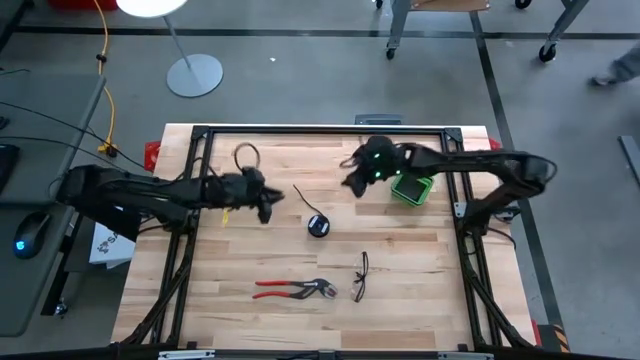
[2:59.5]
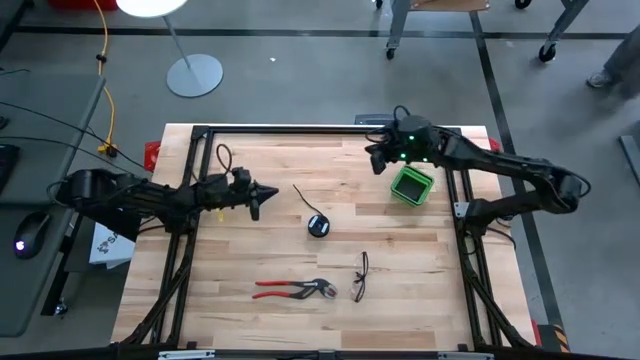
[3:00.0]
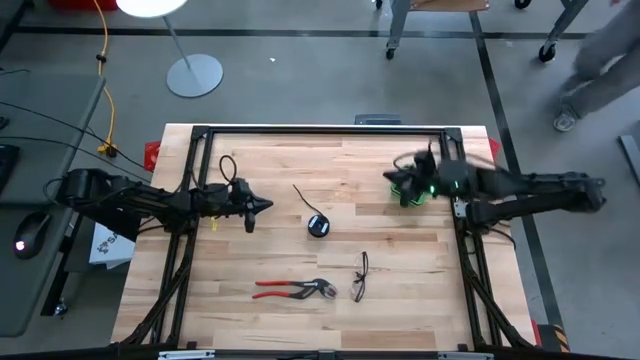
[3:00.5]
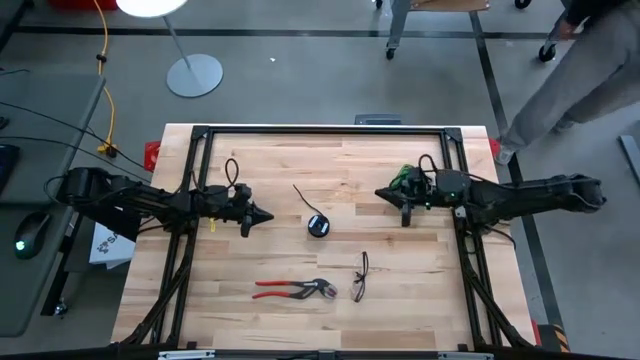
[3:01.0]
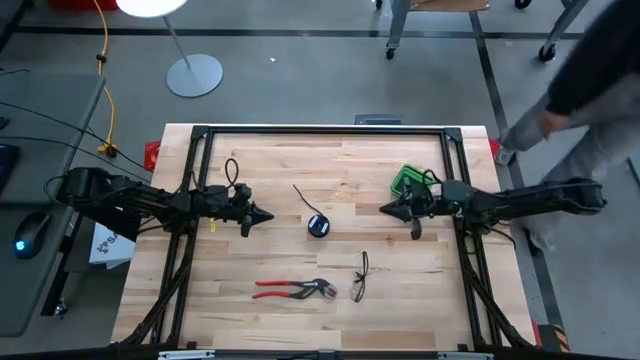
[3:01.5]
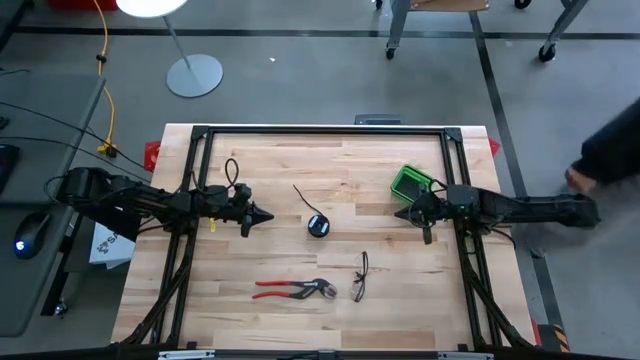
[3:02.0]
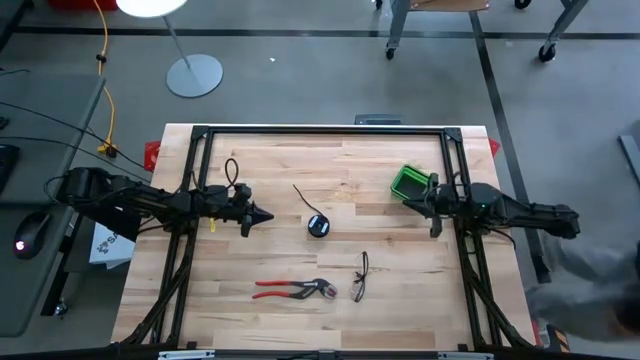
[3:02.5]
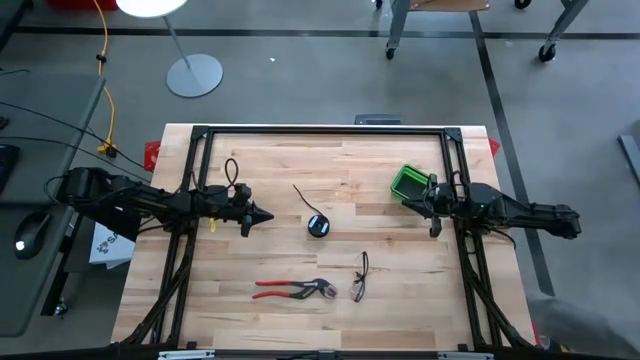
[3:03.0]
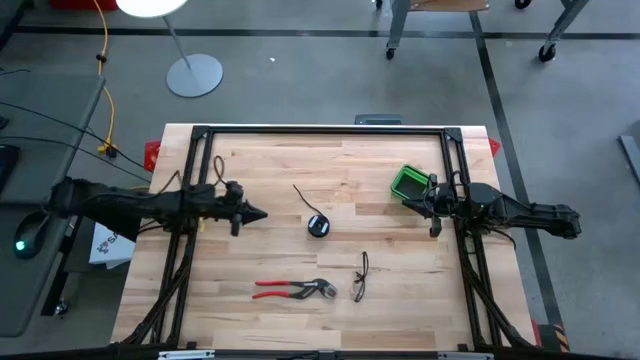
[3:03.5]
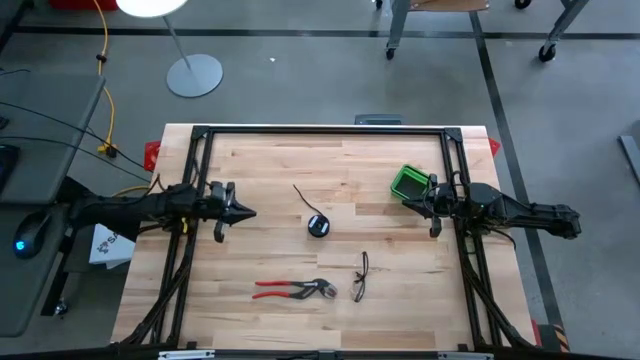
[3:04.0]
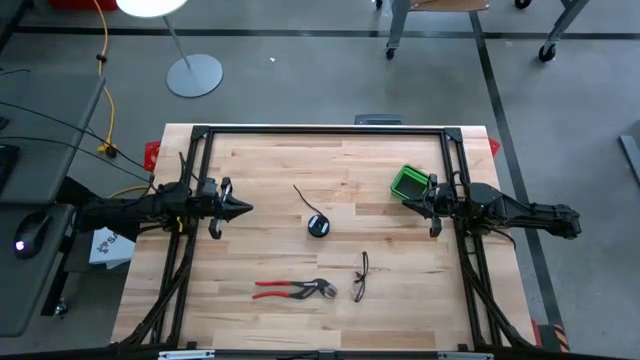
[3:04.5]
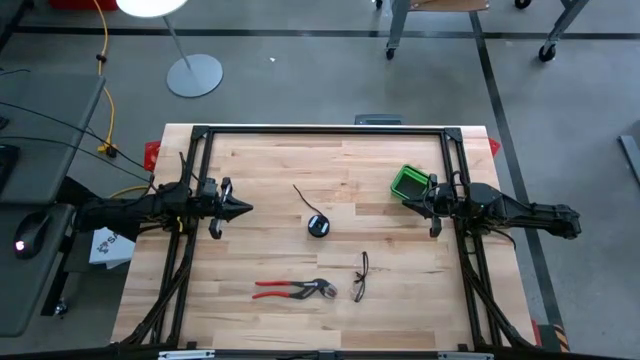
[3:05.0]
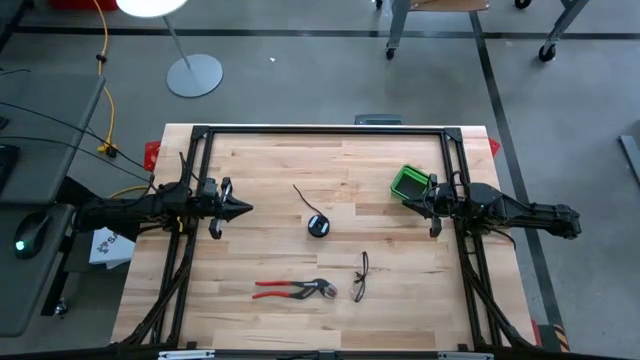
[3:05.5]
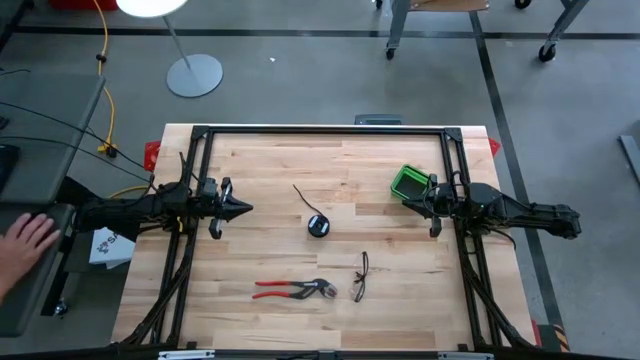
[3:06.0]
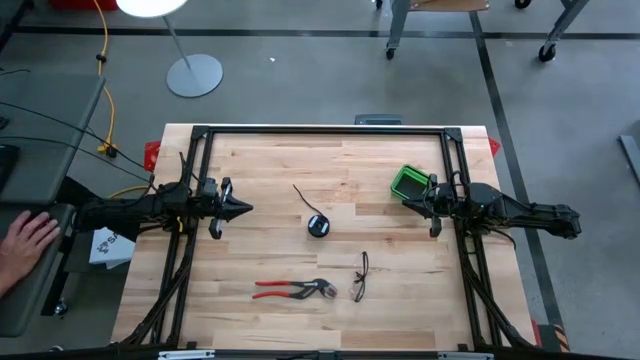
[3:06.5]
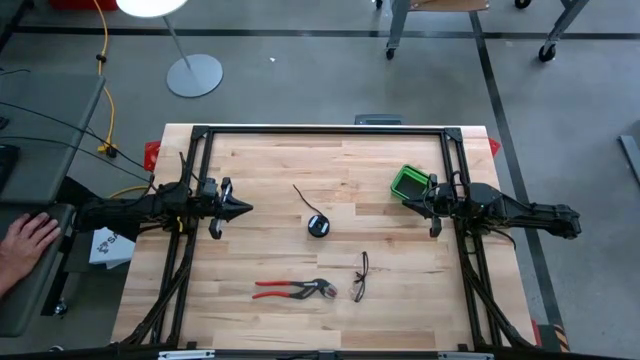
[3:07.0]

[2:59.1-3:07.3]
Task: Coil cords
Return to Home Position

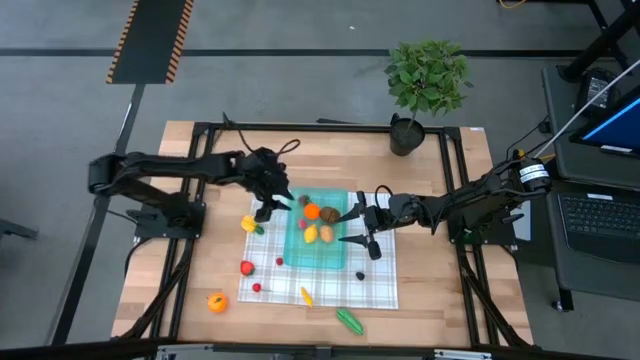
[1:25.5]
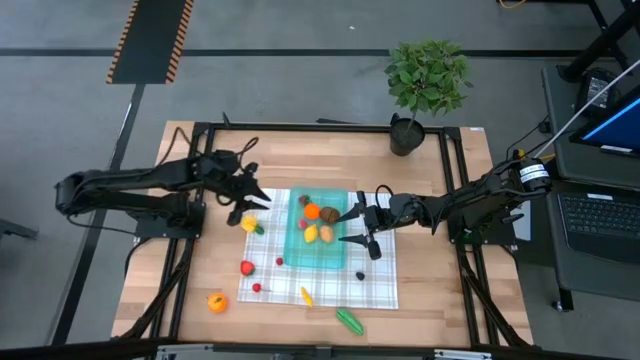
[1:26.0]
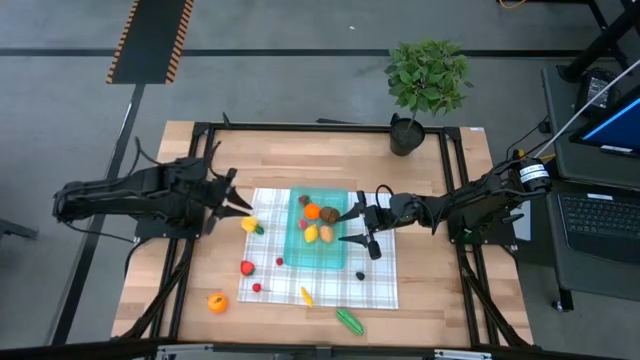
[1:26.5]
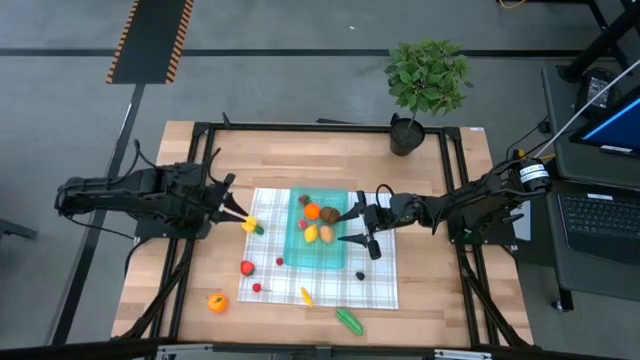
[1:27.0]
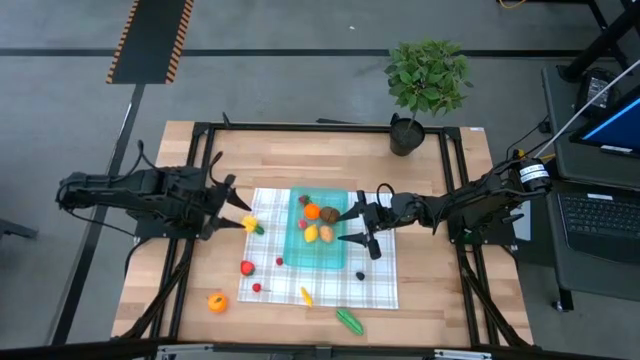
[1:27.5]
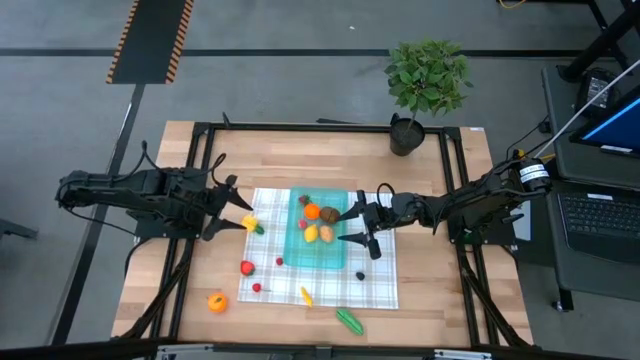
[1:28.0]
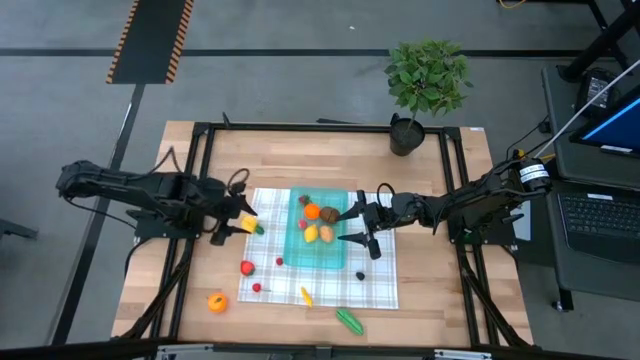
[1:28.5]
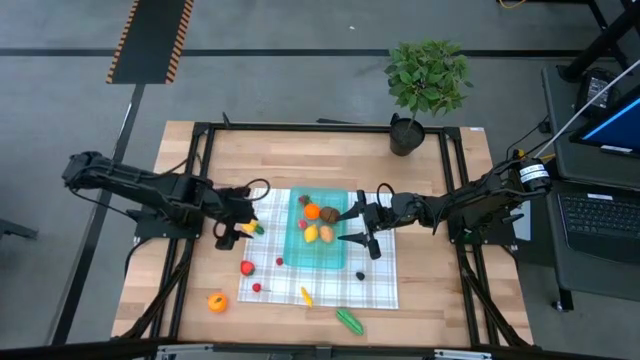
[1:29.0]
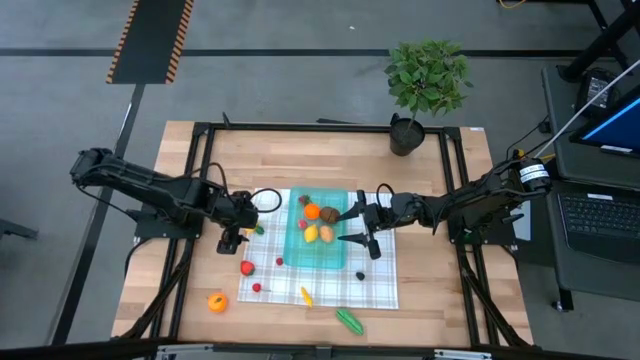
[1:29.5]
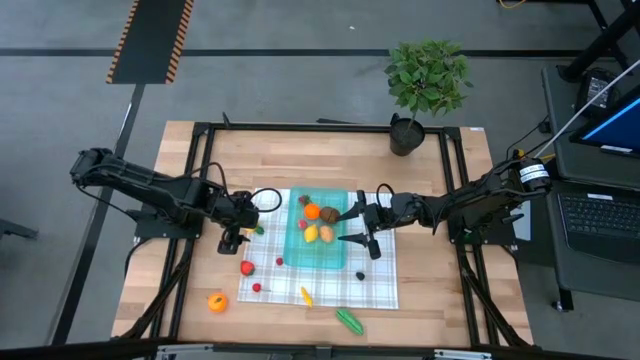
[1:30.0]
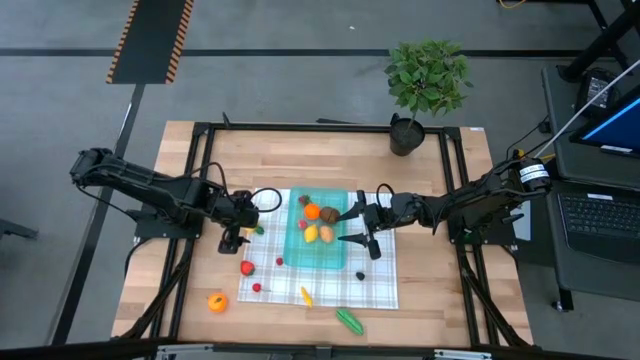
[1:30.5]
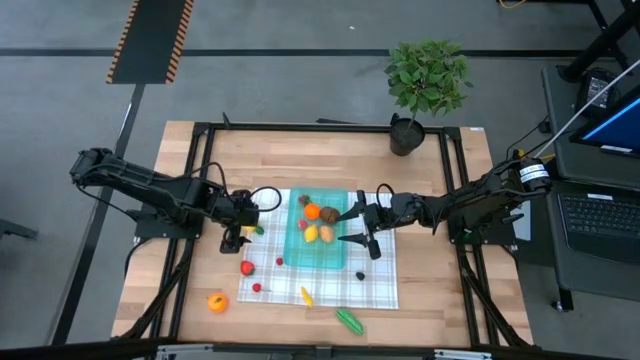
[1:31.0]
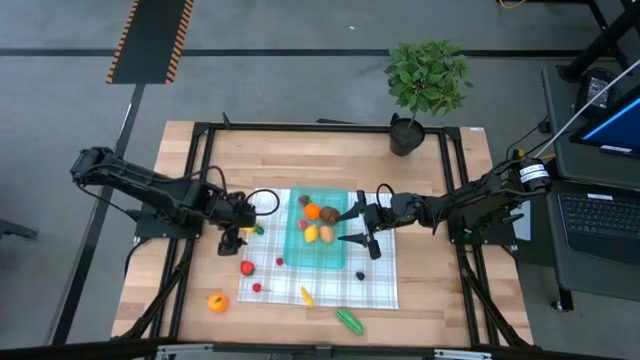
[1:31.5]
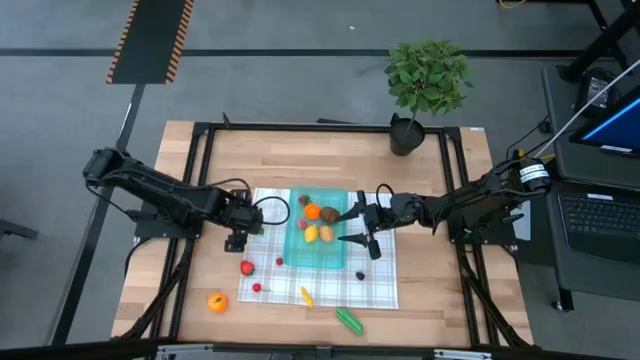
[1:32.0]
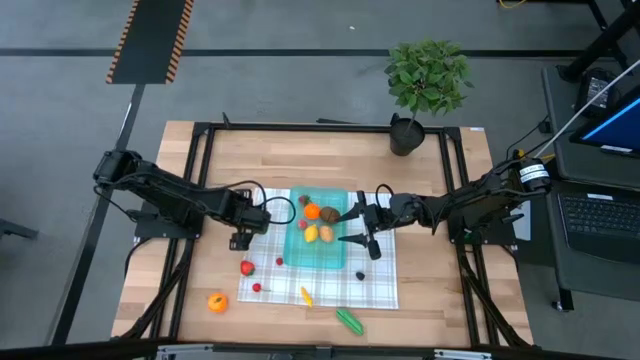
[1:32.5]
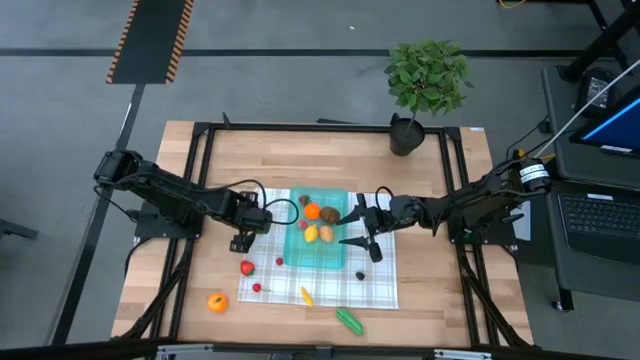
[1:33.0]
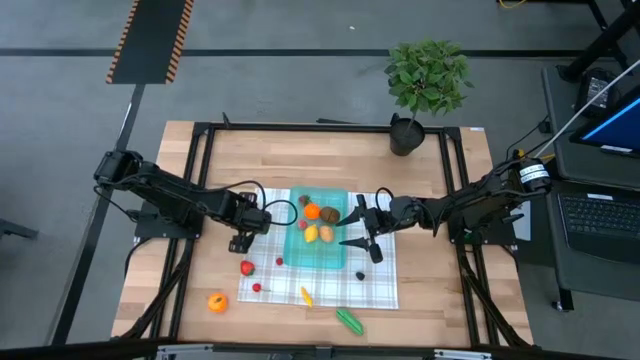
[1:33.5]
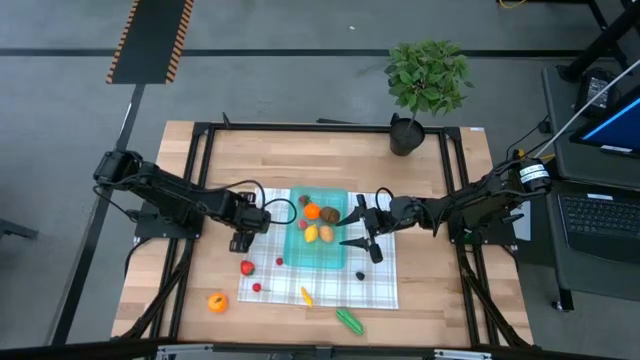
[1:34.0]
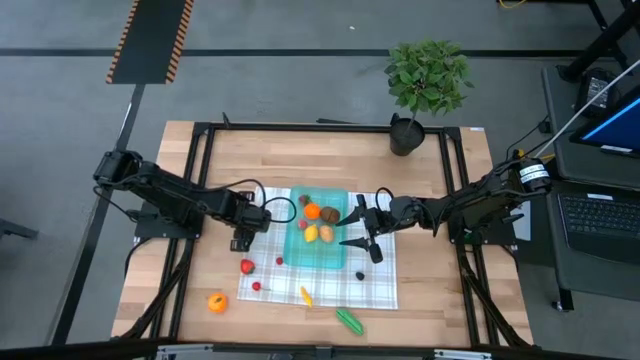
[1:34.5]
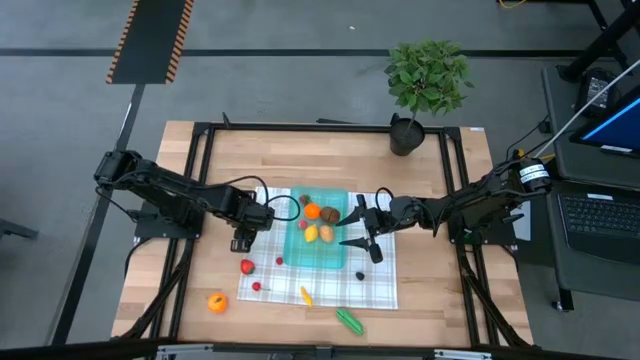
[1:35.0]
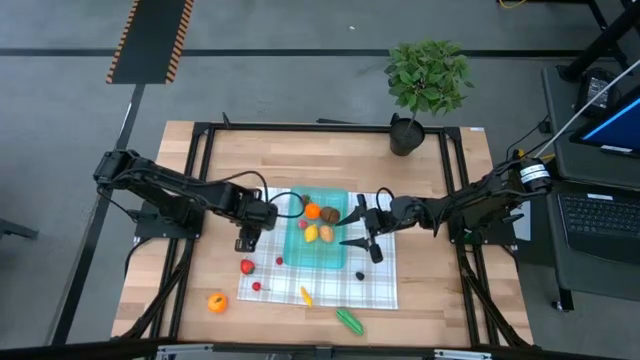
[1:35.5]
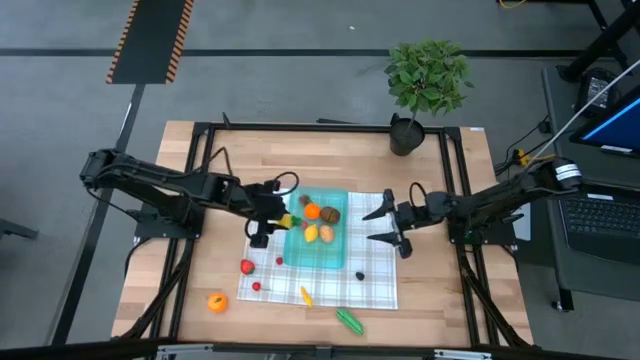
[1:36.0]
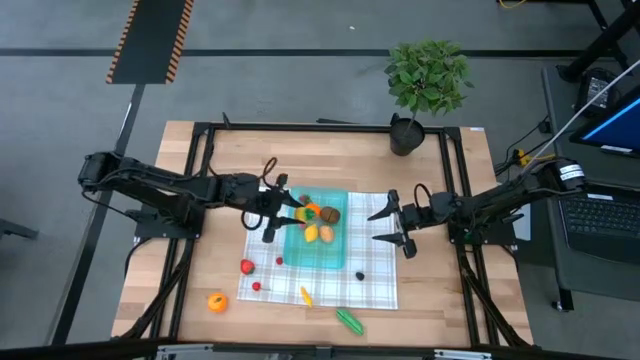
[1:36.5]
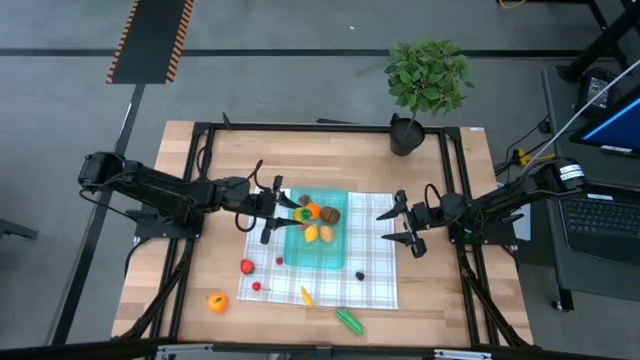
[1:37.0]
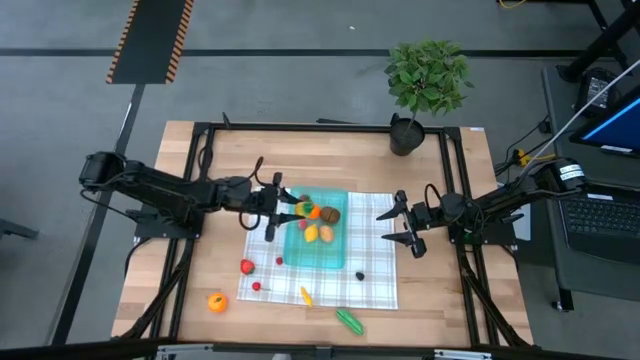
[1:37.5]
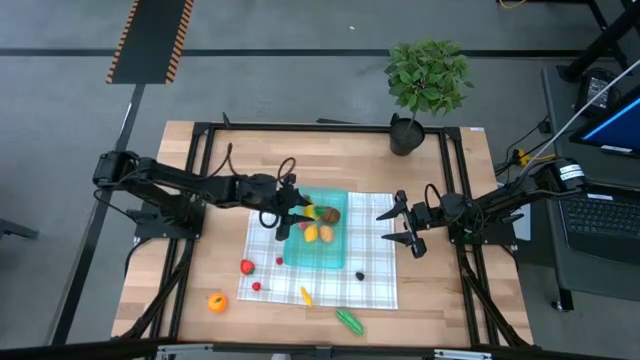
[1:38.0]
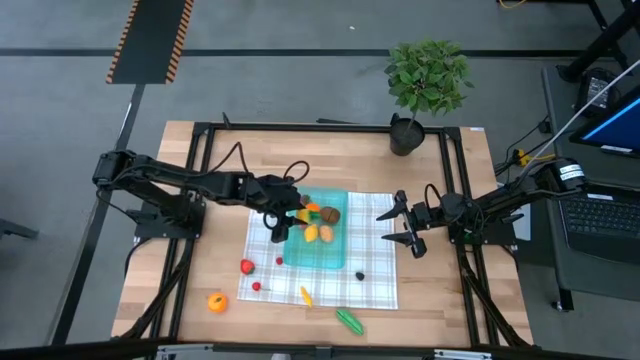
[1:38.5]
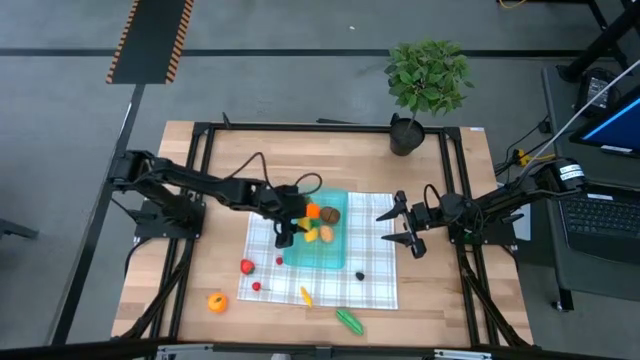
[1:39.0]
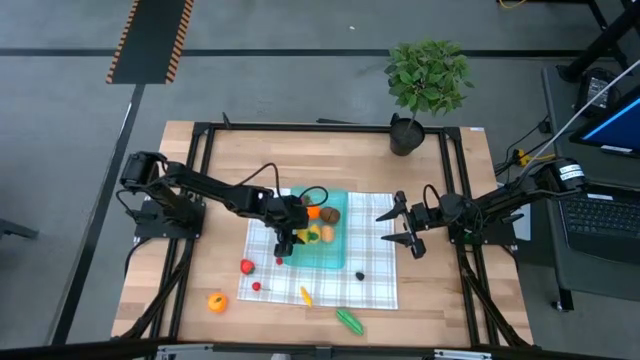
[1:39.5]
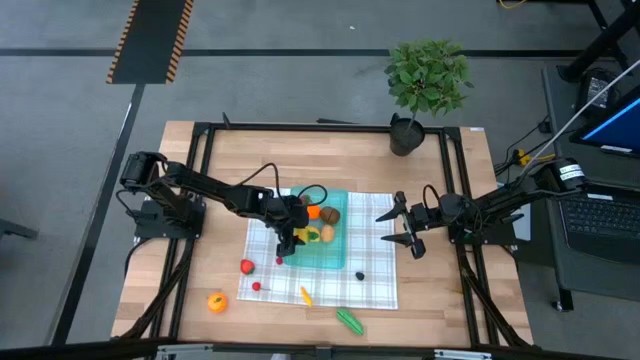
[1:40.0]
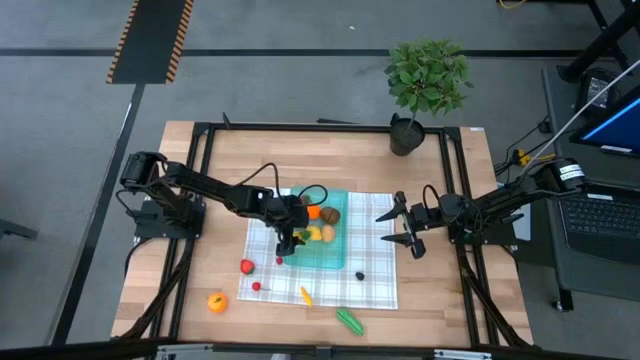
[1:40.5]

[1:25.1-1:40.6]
Task: Pick and placing Produce into tupperware
Put the yellow pineapple into the blue bin
